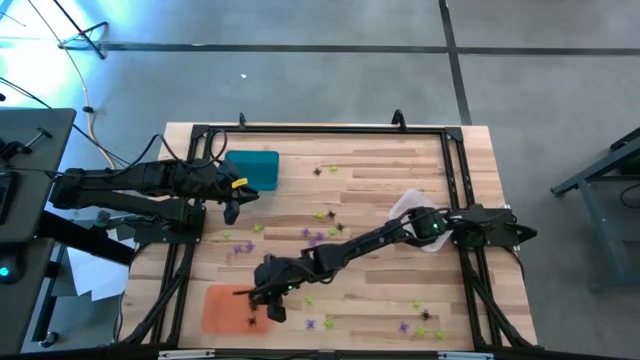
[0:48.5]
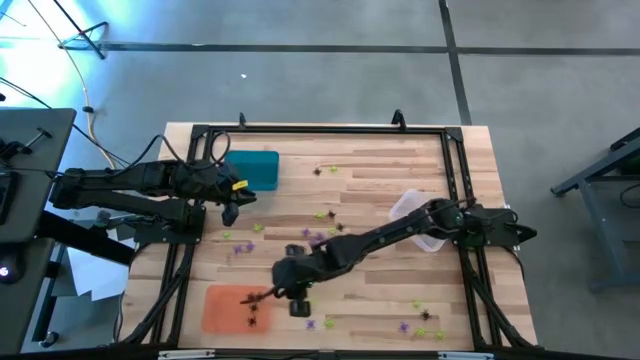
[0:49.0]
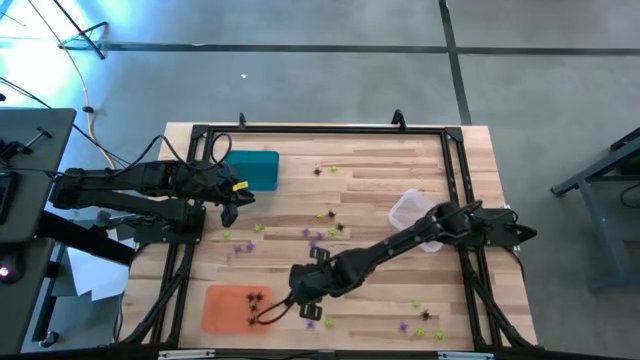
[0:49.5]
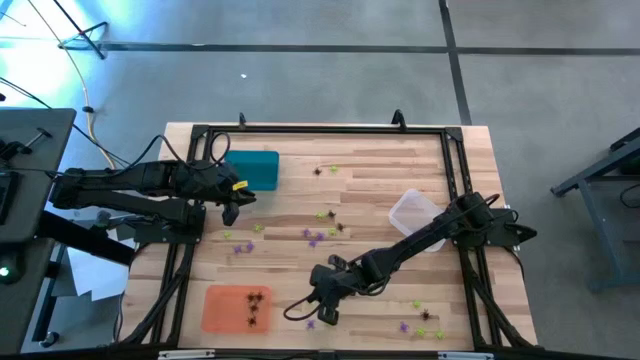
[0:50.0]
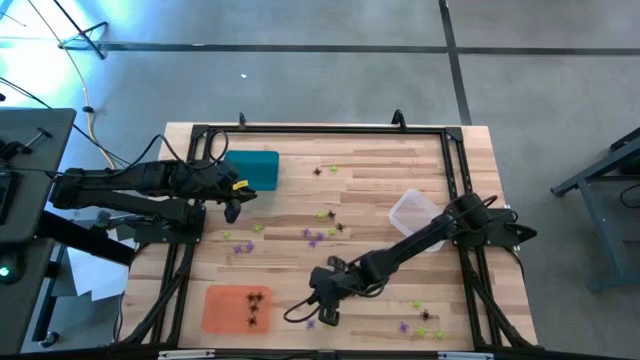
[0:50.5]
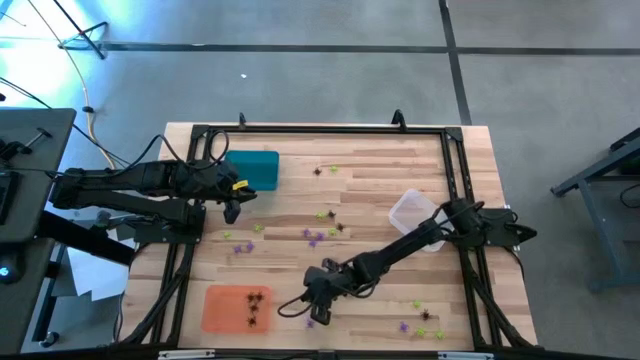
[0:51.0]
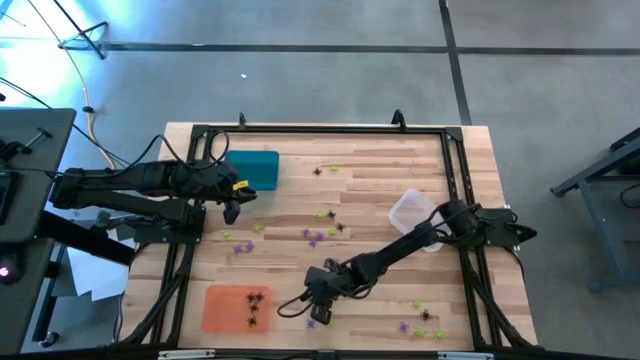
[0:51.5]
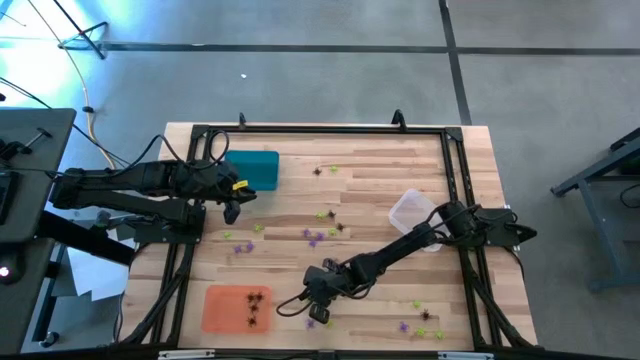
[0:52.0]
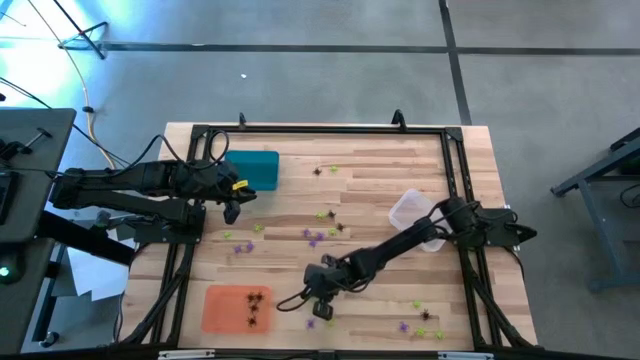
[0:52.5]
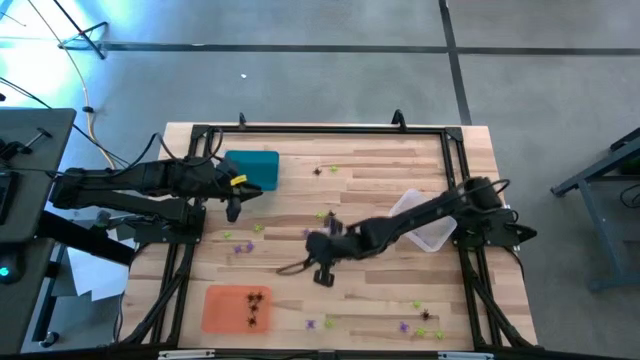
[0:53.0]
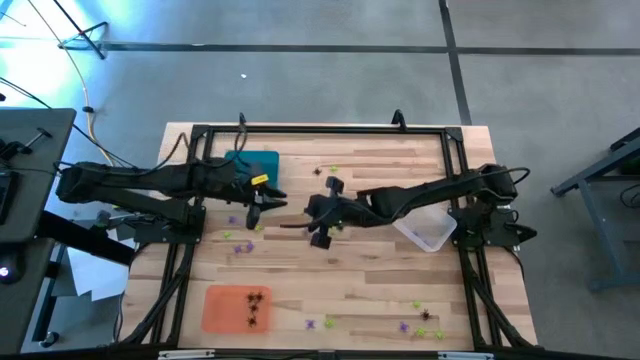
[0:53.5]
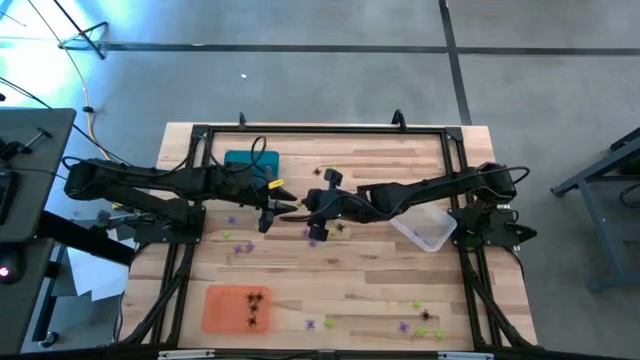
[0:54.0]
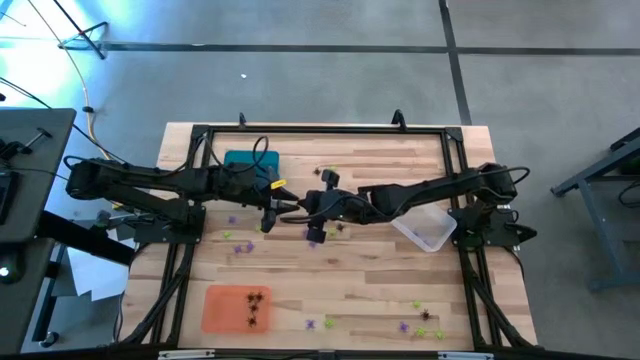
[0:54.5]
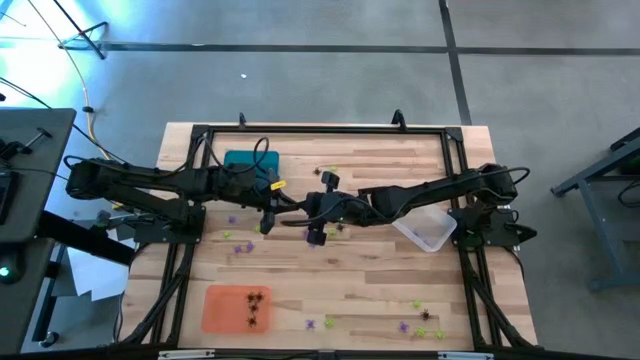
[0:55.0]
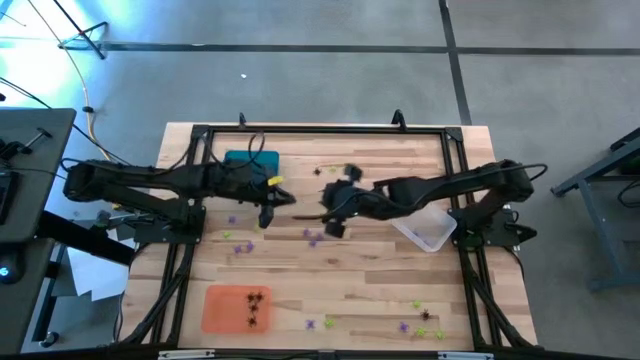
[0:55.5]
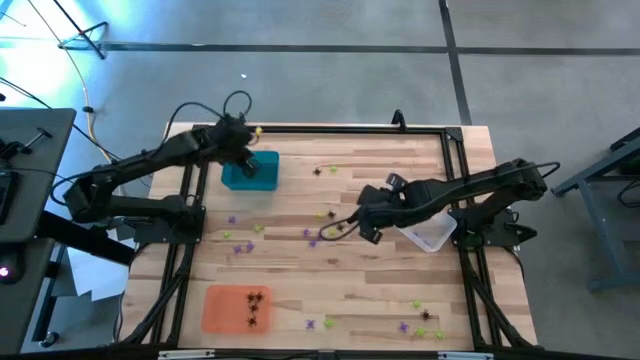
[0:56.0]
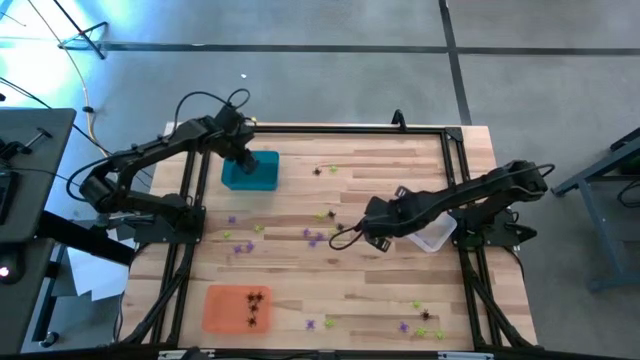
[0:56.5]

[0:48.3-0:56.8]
Task: Sort Halloween decoration
Put the green spider toy into the blue bin

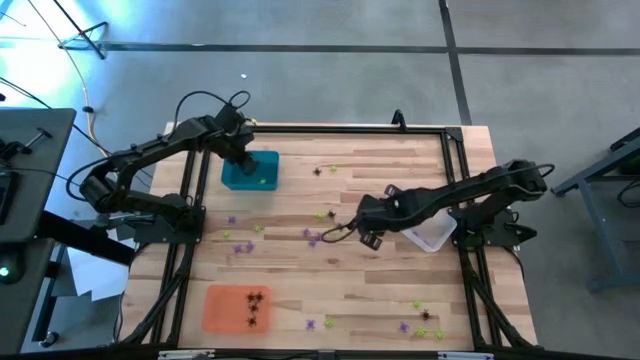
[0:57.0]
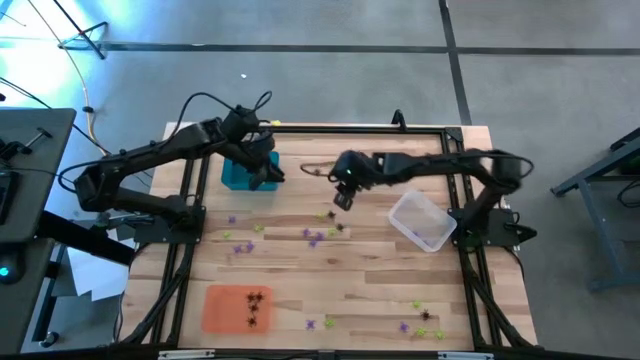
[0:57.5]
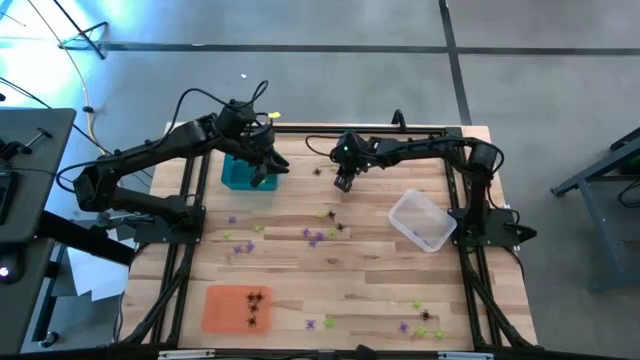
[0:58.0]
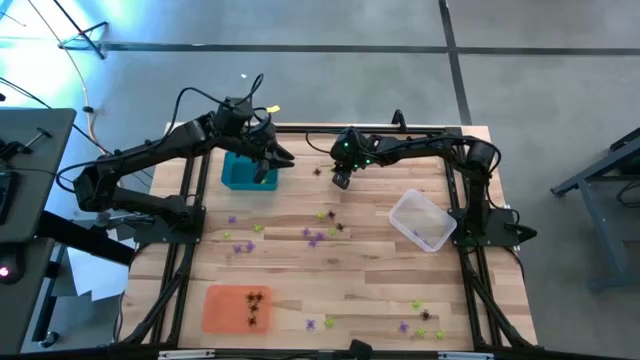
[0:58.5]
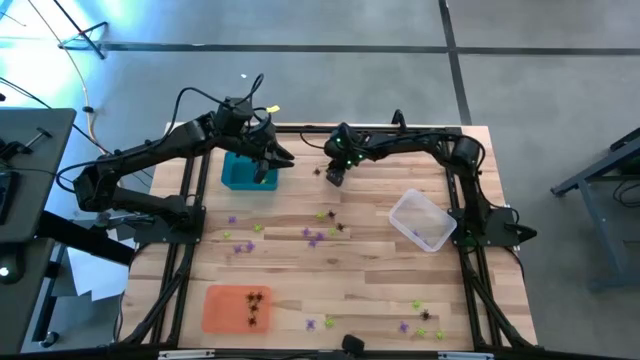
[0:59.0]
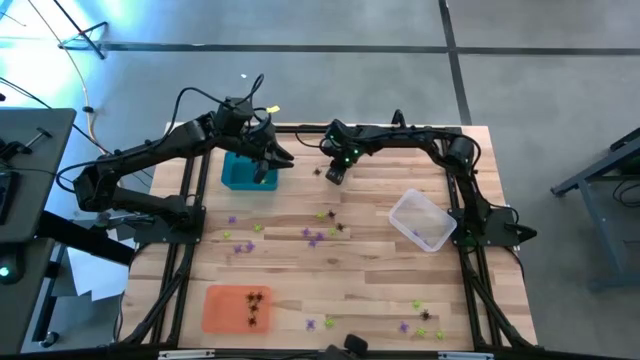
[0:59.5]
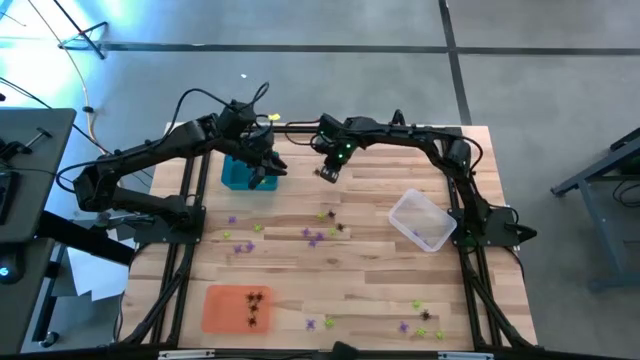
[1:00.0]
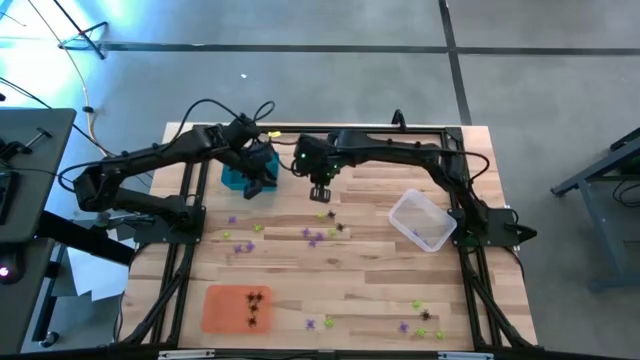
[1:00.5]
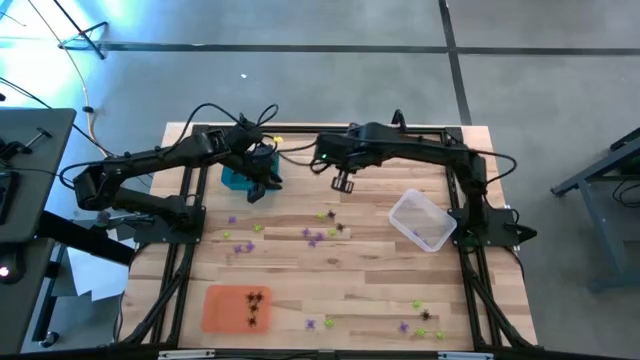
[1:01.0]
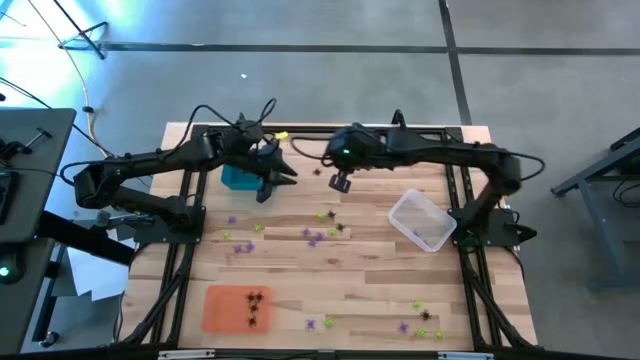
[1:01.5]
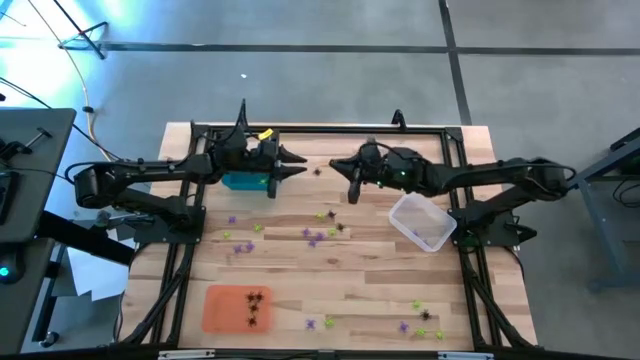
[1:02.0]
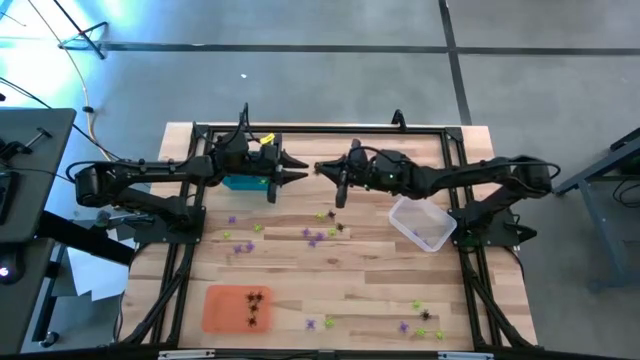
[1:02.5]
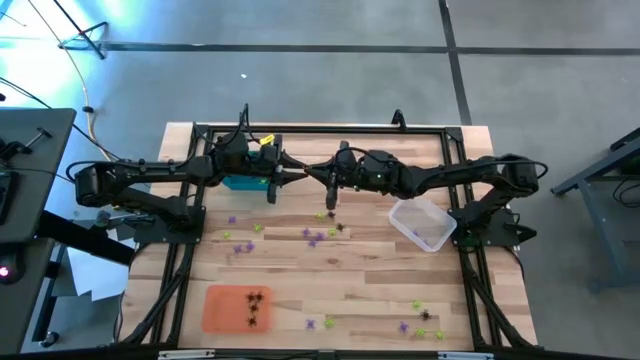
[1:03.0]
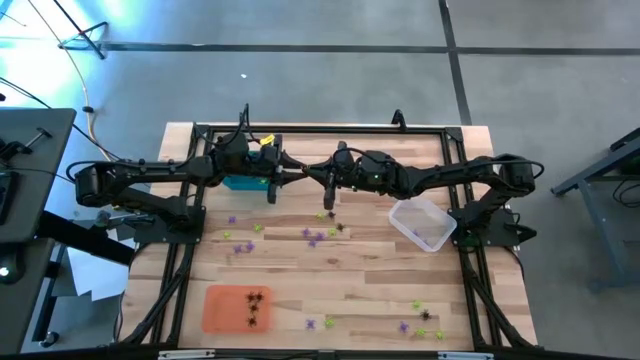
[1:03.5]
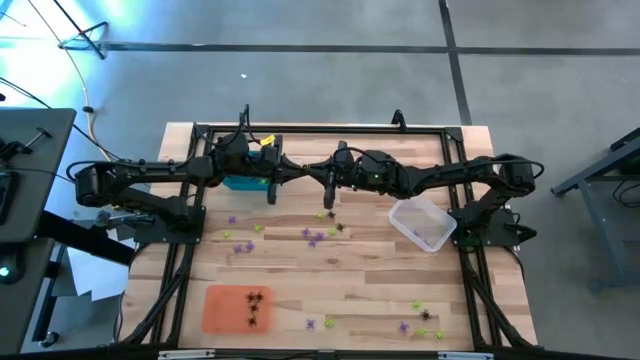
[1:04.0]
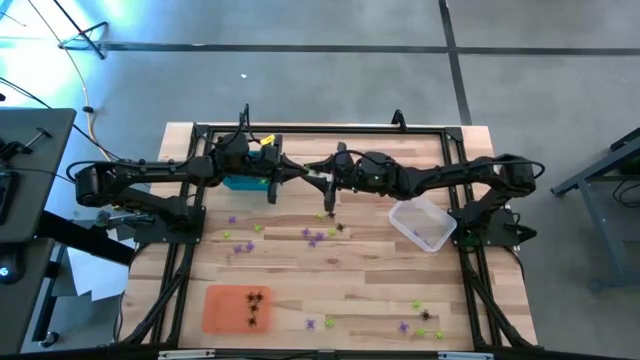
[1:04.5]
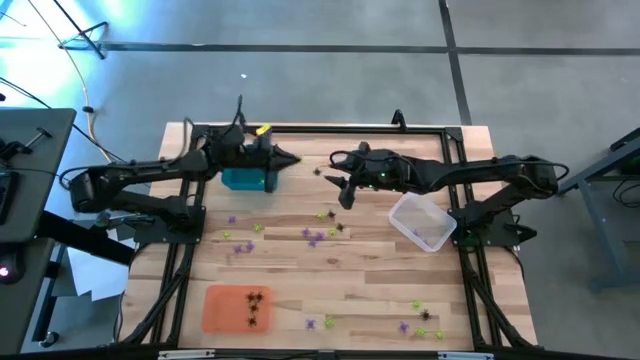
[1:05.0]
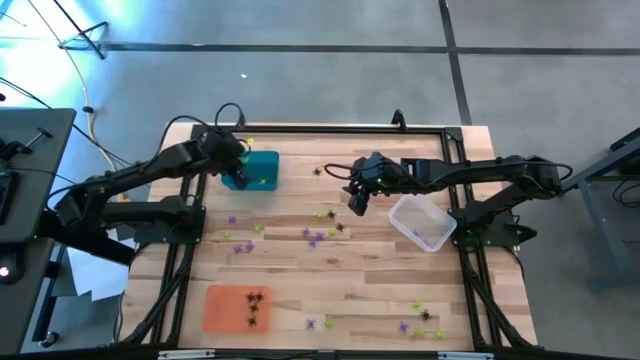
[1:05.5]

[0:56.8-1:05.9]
Put the green spider toy into the blue bin

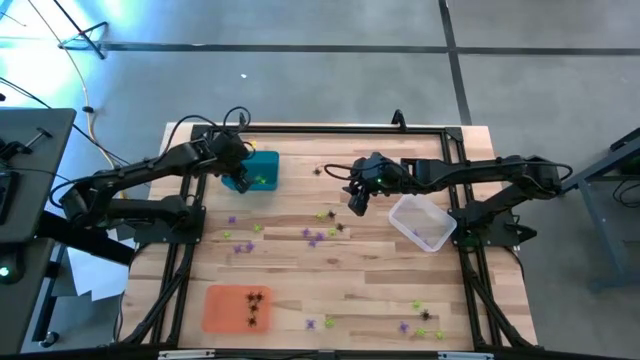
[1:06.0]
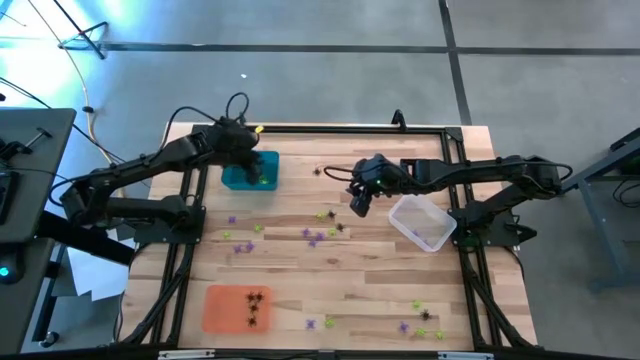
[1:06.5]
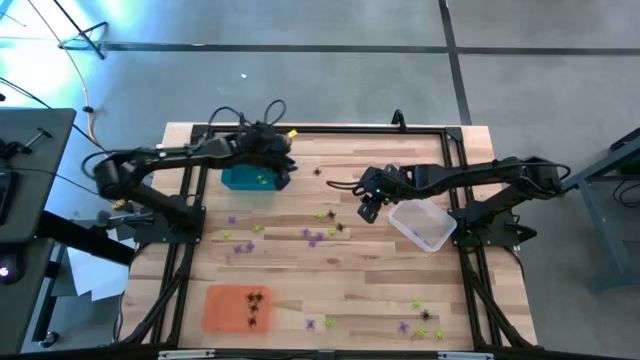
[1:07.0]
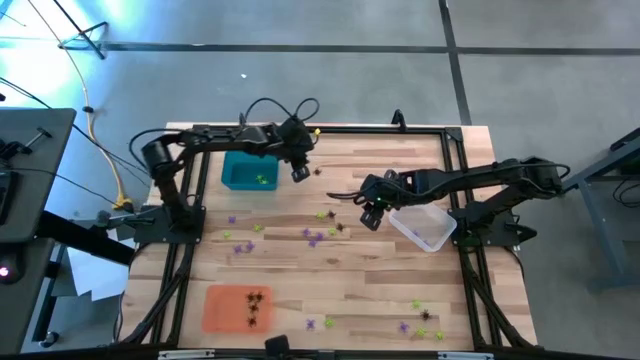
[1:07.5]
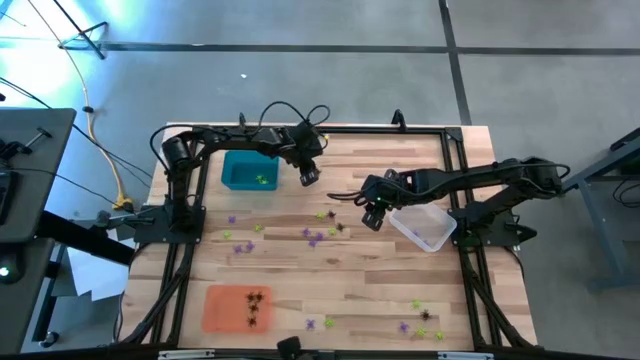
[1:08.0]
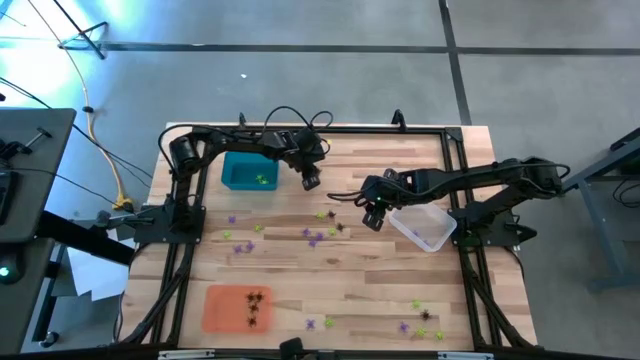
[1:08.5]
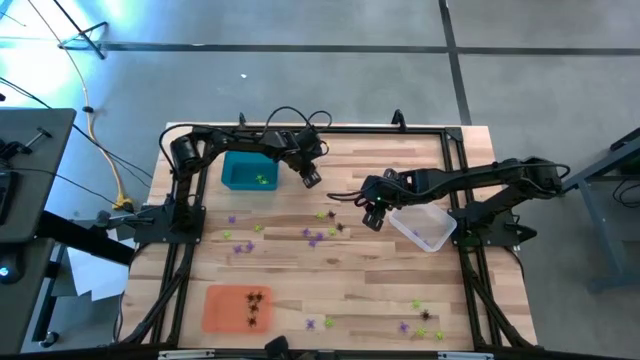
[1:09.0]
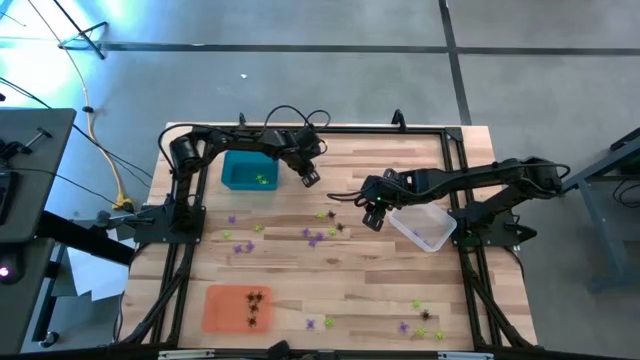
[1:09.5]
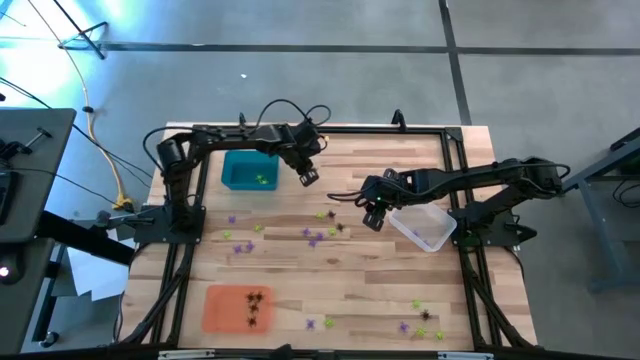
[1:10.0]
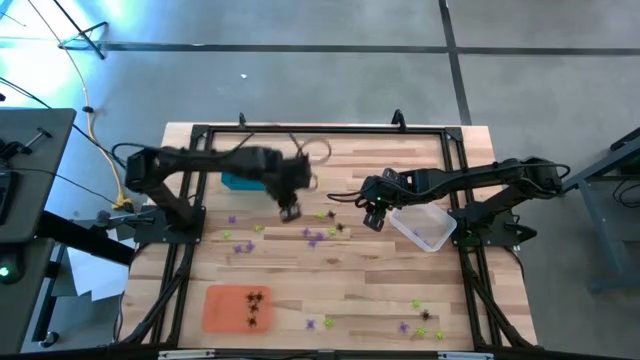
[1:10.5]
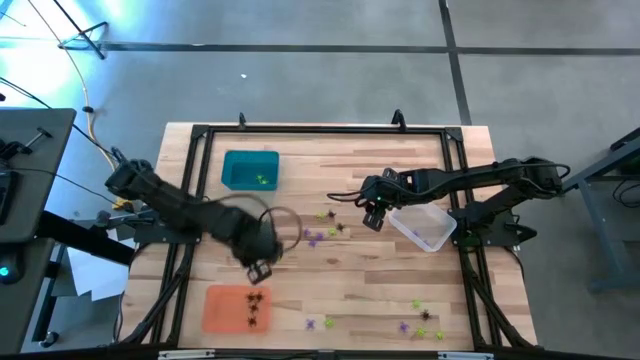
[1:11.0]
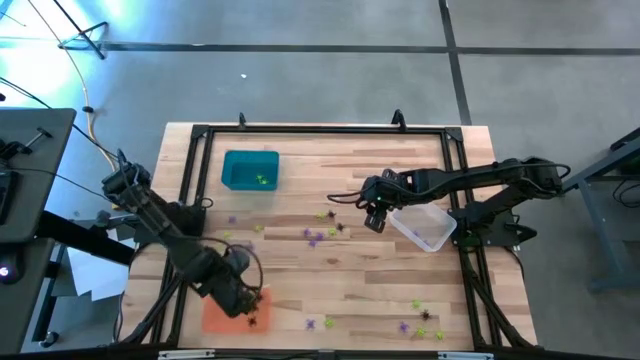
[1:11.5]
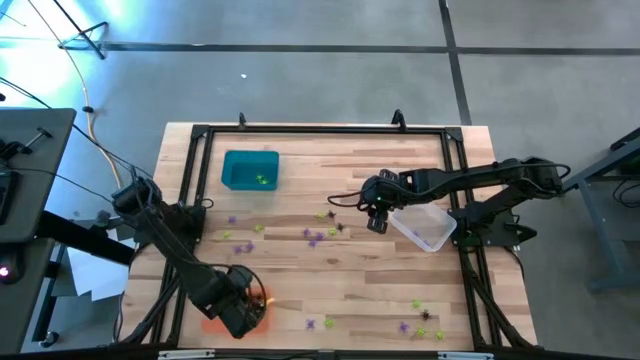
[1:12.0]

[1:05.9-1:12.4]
Put the black spider toy into the orange bin
